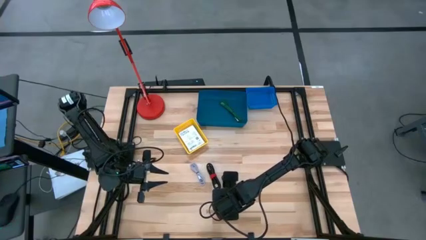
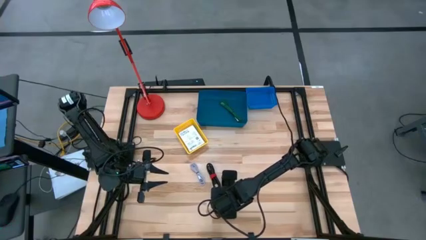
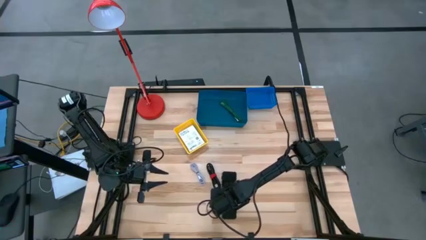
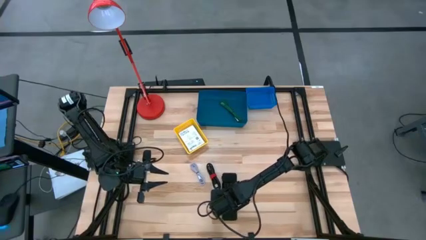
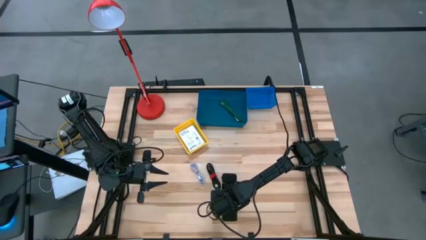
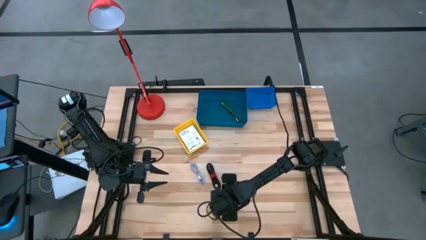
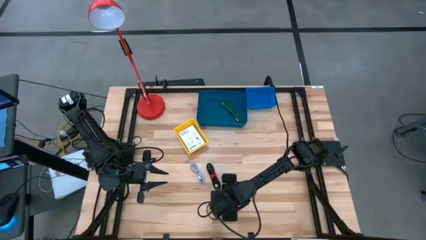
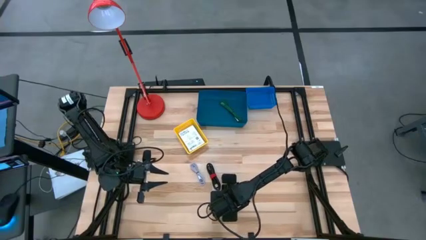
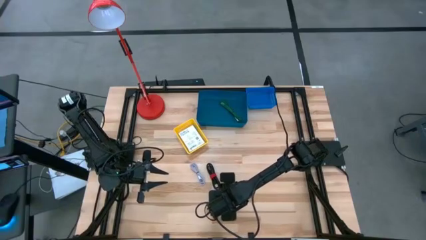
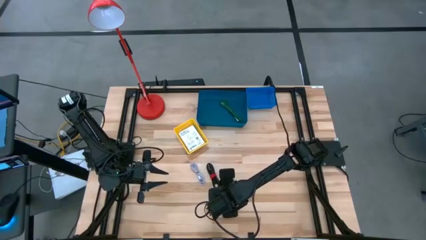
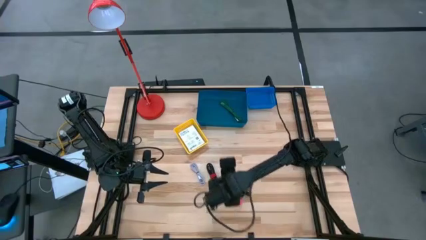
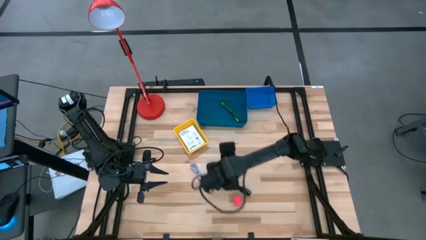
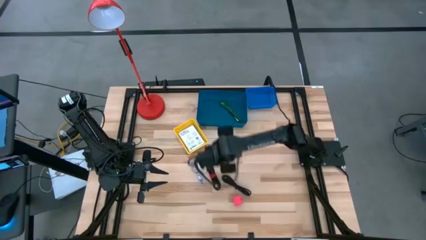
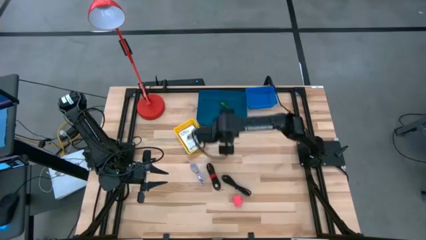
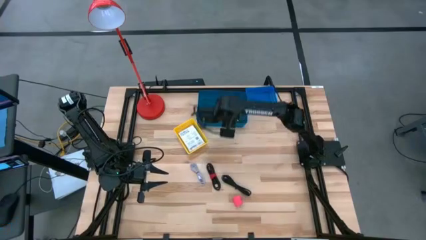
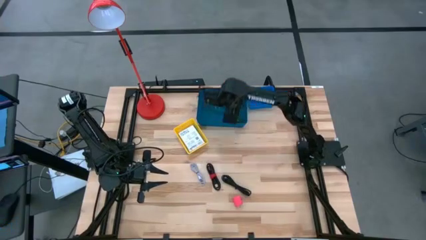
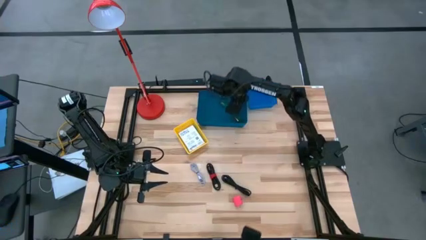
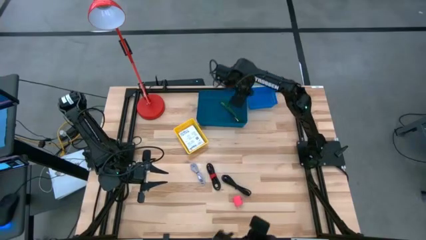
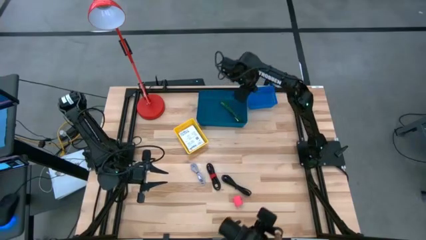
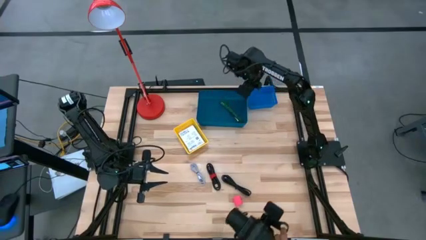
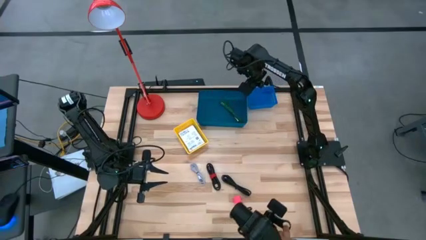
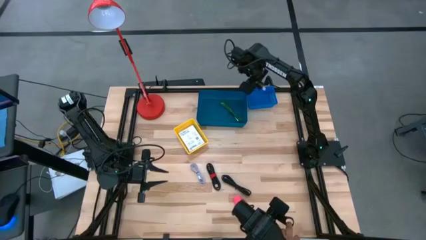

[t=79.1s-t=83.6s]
Task: Pick and place items into bin
Put the black charger adapter into the blue bin

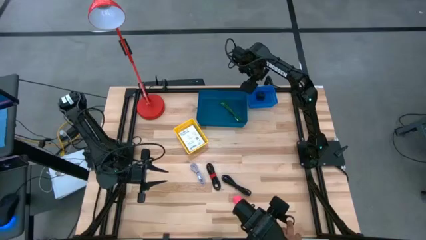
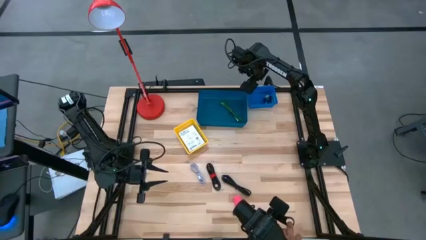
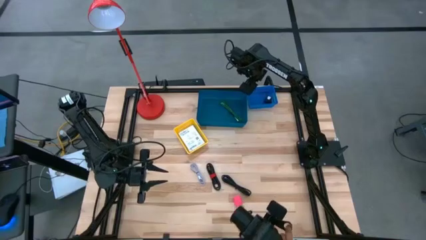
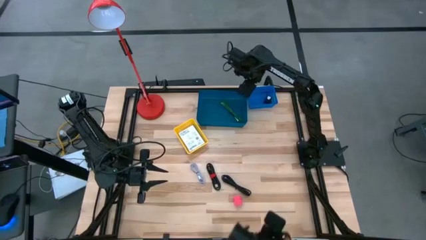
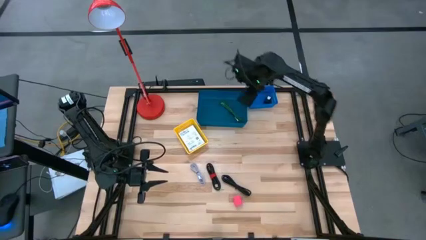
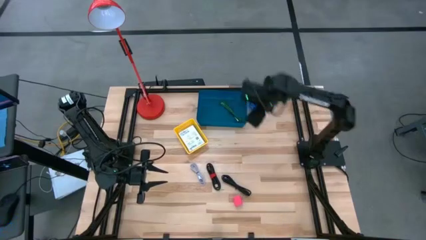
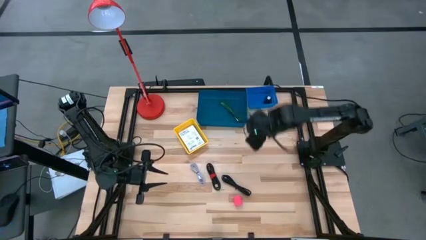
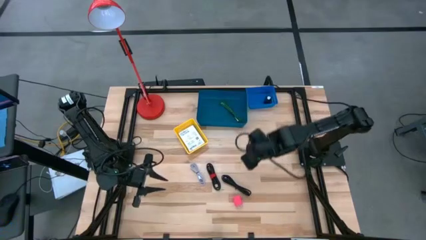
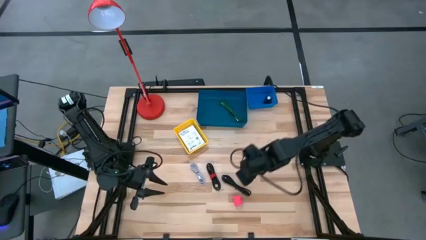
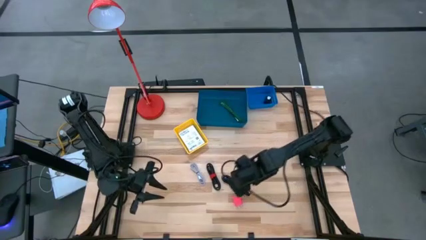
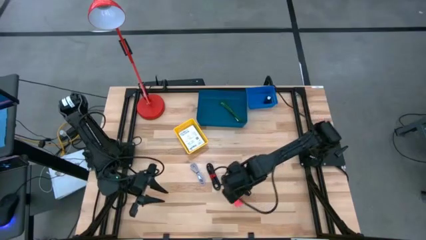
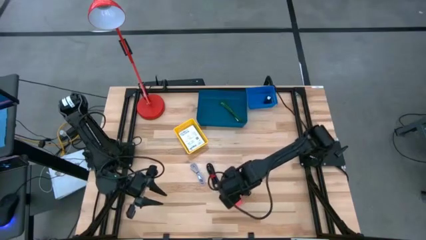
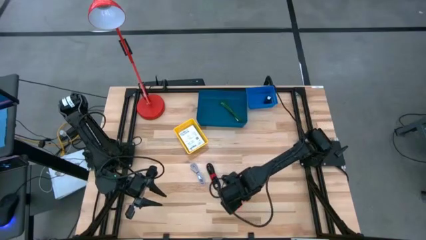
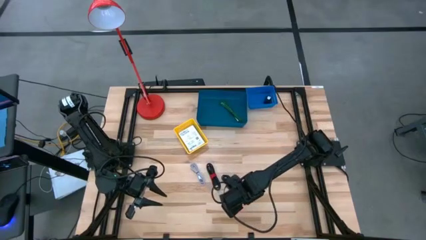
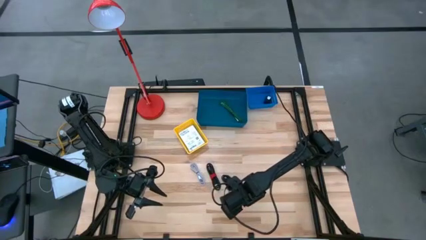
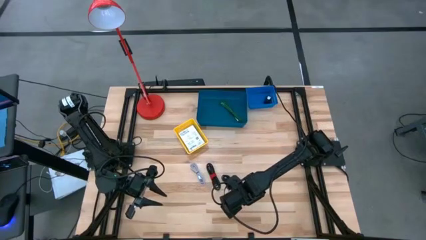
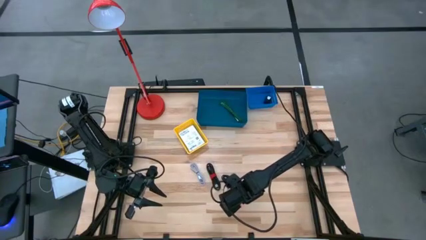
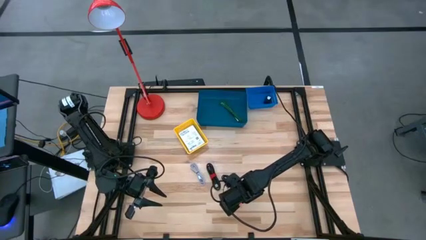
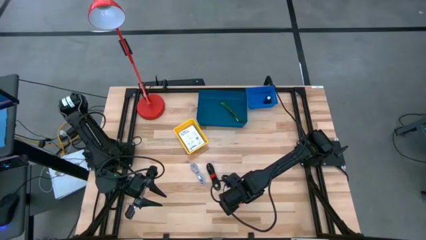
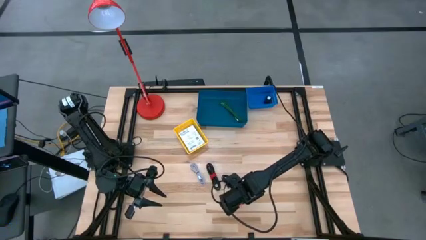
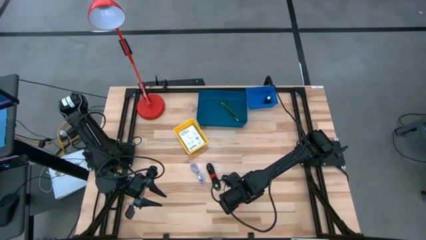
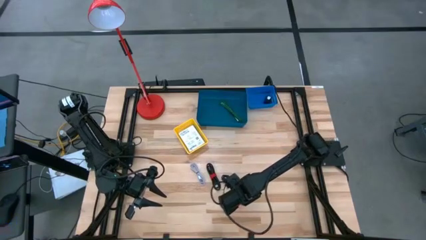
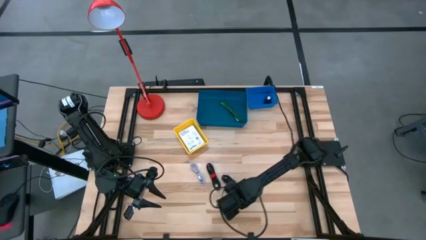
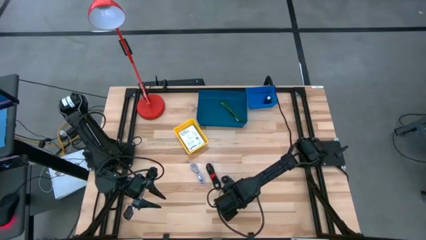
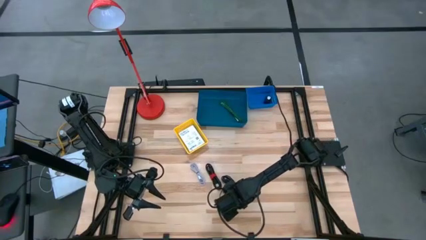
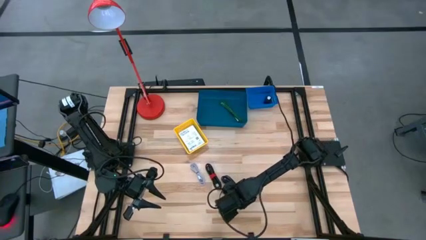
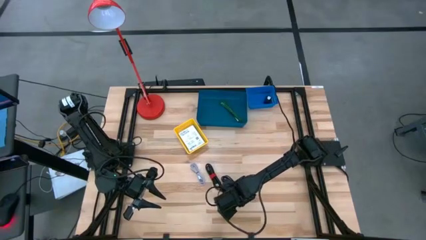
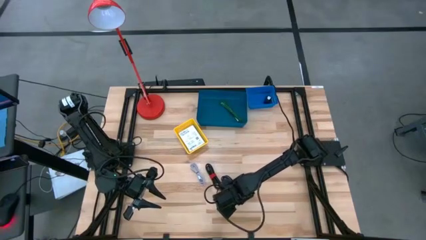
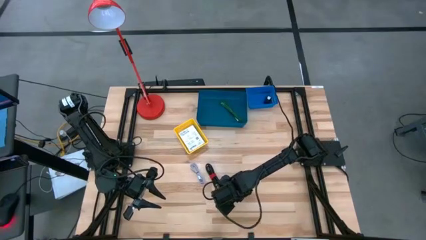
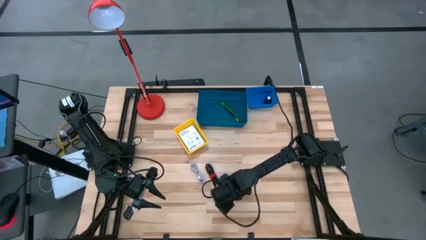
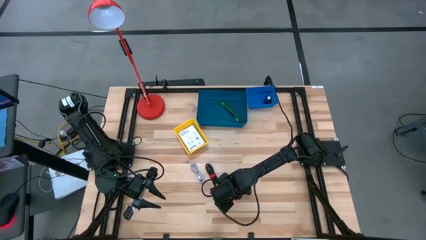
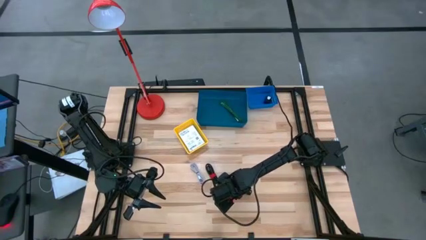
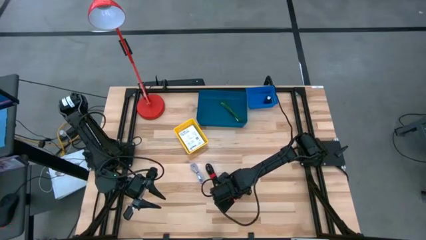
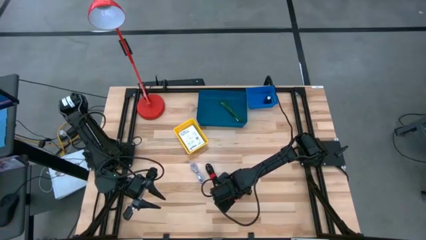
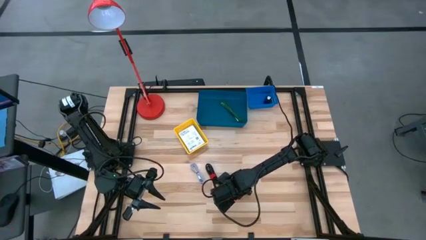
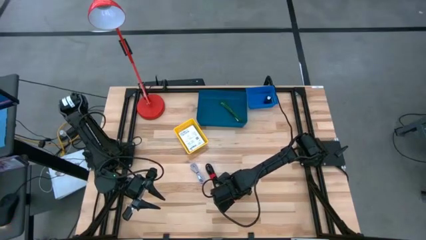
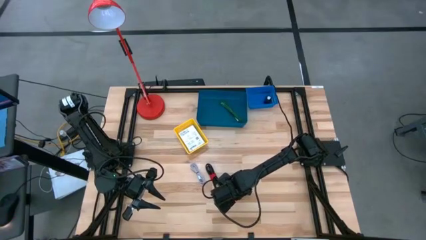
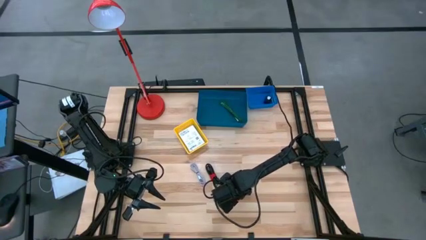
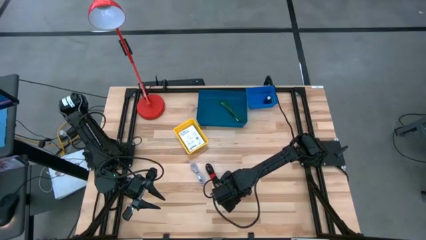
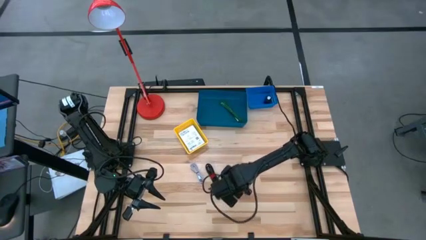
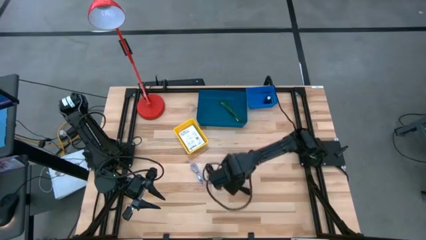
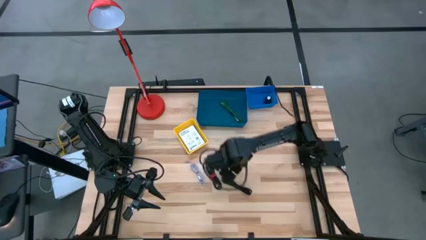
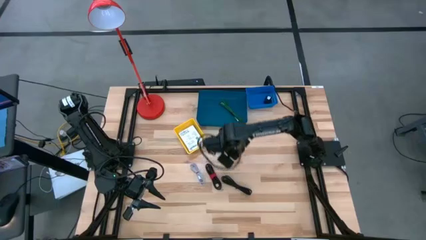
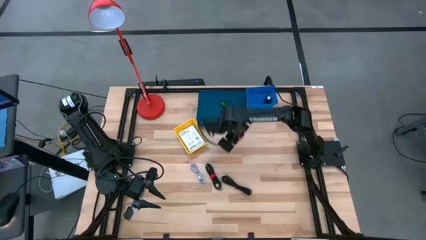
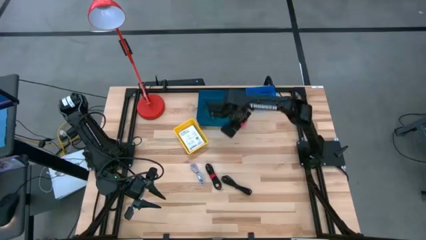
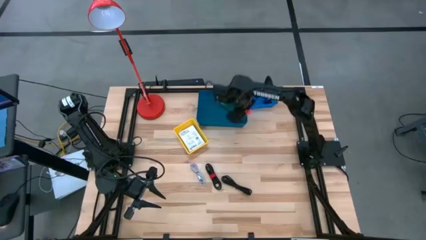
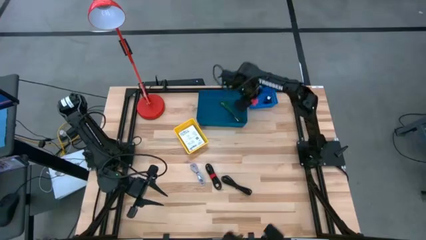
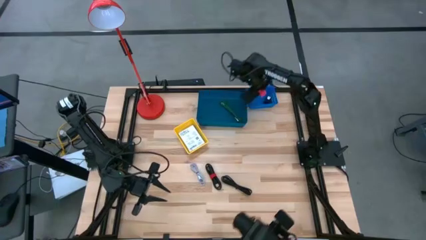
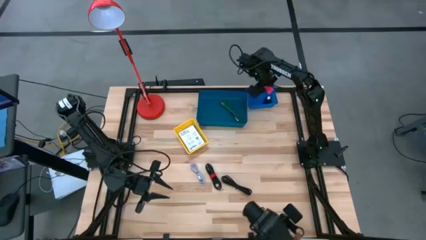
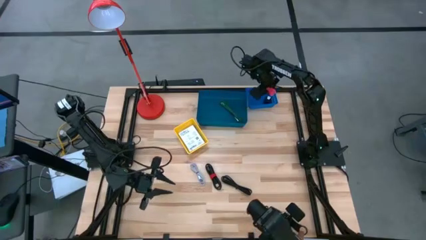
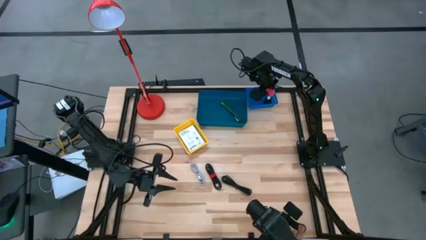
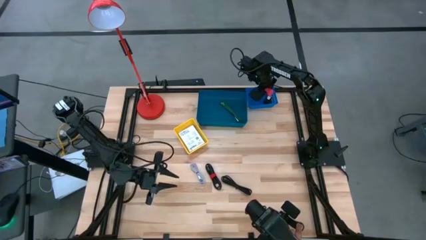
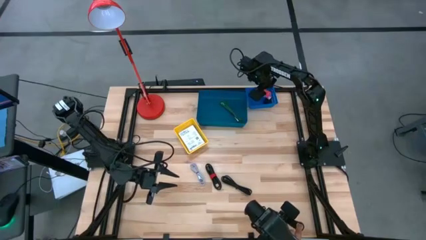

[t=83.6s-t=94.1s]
Put the pink charger adapter into the blue bin

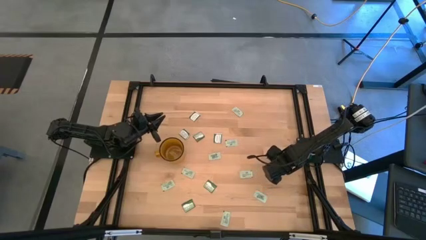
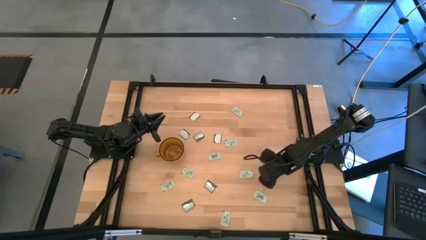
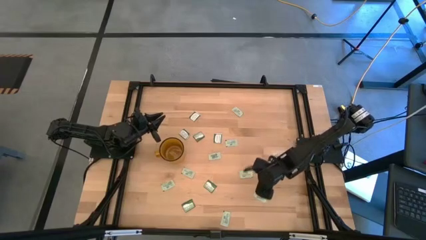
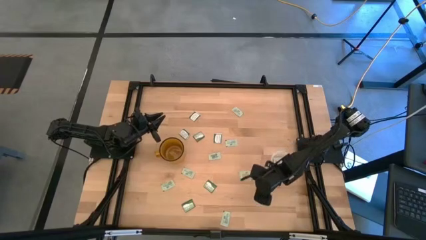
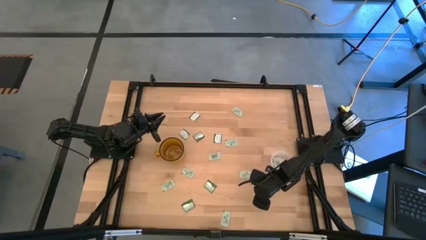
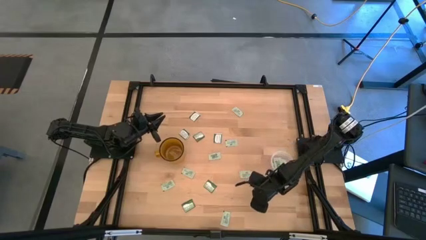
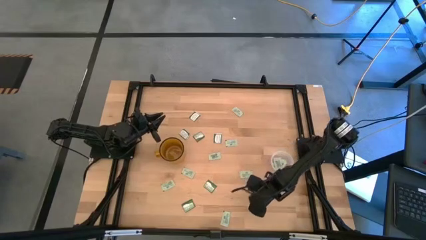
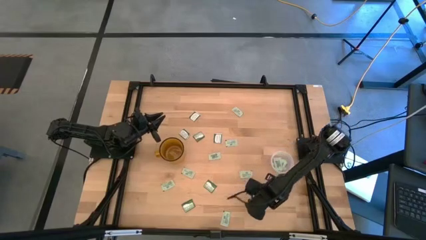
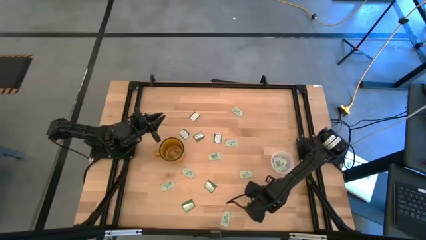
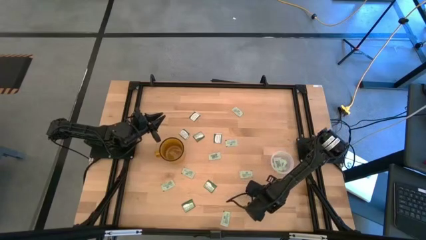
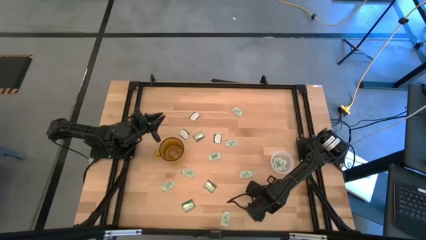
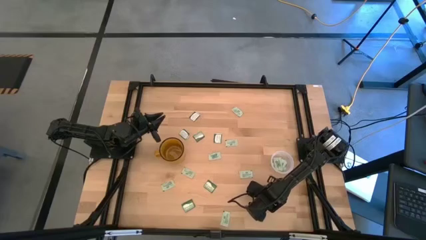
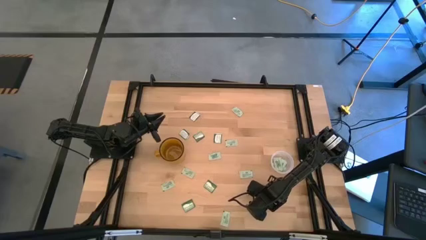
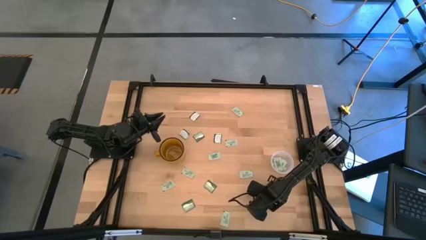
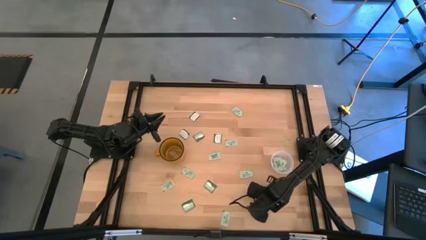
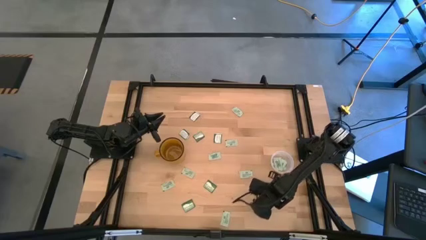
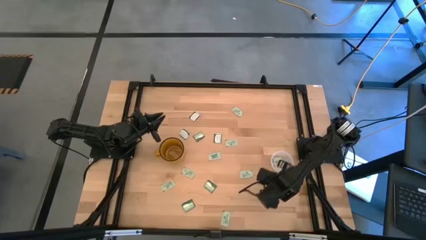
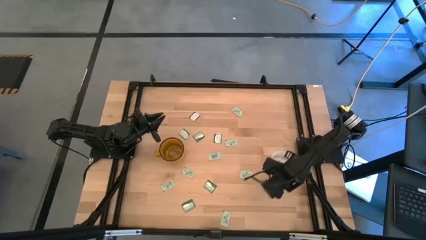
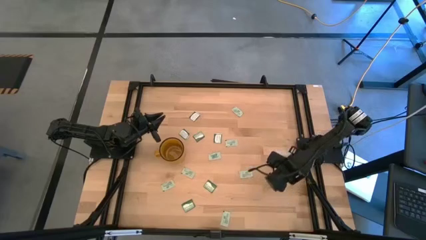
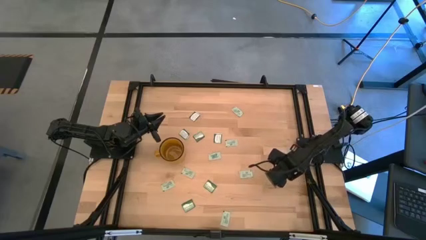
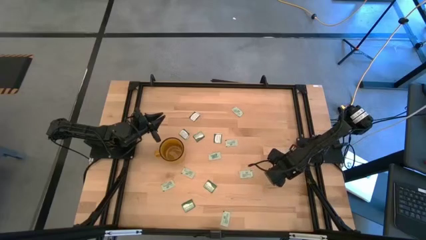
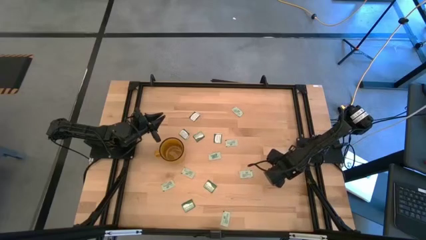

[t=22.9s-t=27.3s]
Task: Pick and place Stevia / Truvia into bins
Put the green stevia packet into the transparent container
